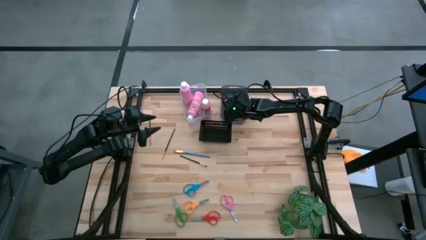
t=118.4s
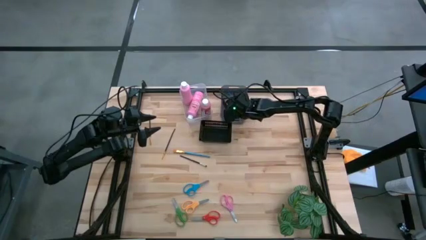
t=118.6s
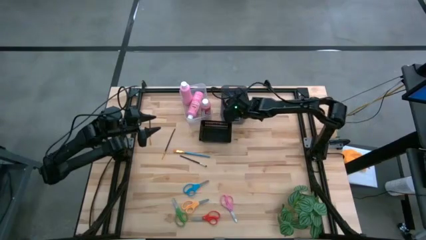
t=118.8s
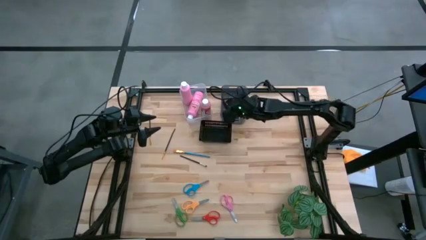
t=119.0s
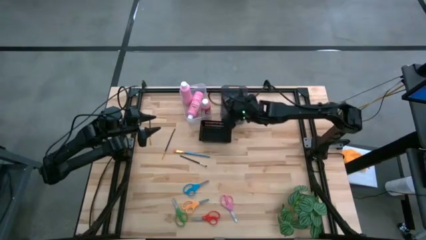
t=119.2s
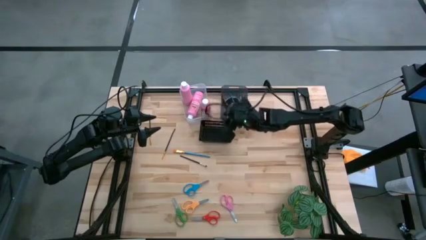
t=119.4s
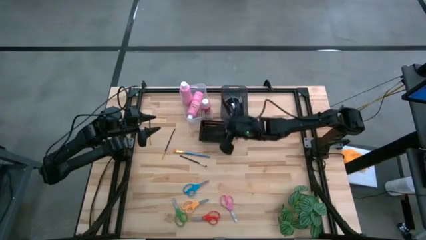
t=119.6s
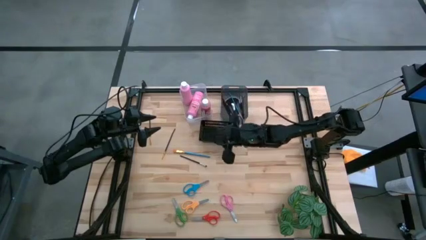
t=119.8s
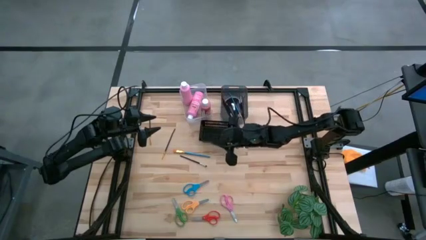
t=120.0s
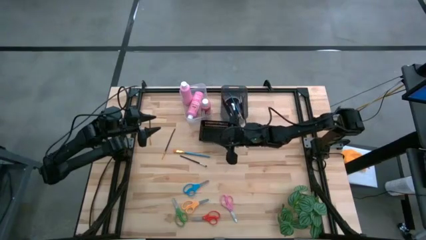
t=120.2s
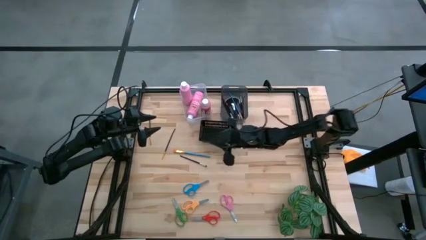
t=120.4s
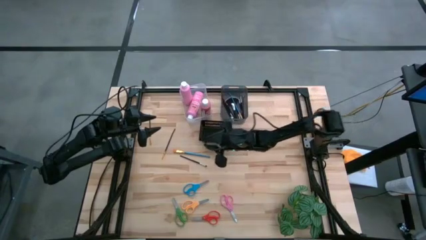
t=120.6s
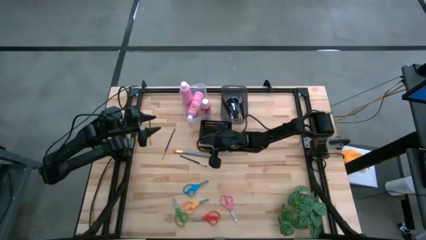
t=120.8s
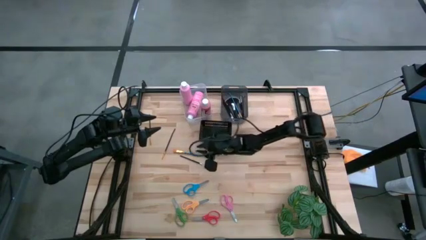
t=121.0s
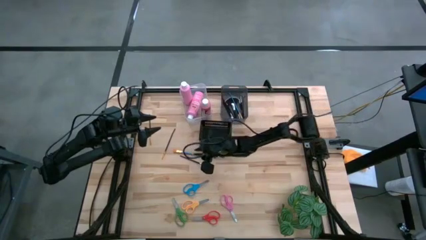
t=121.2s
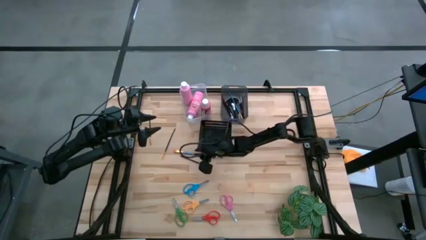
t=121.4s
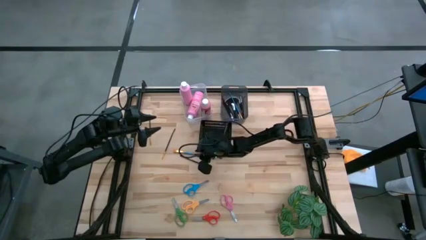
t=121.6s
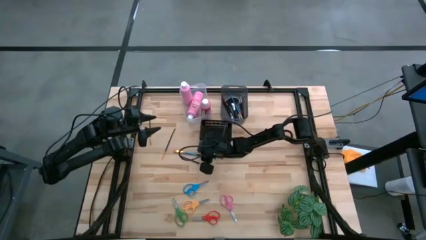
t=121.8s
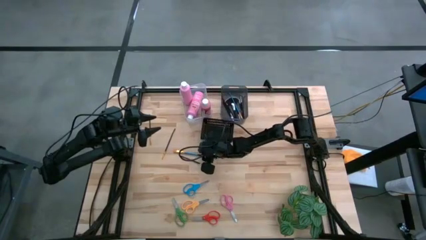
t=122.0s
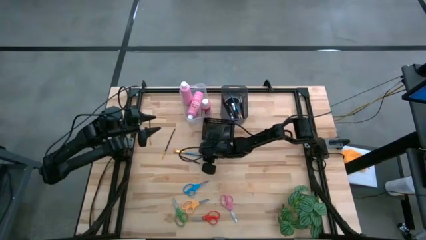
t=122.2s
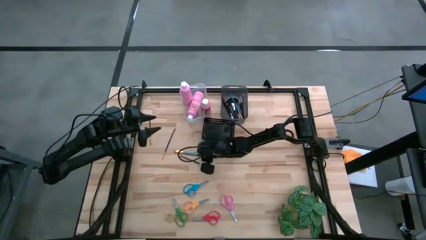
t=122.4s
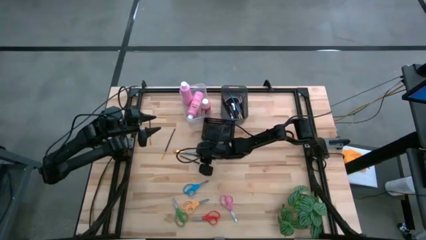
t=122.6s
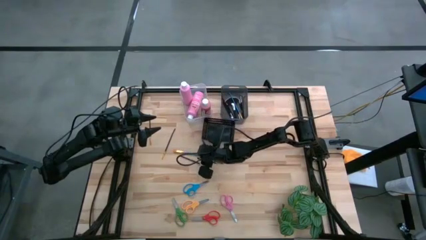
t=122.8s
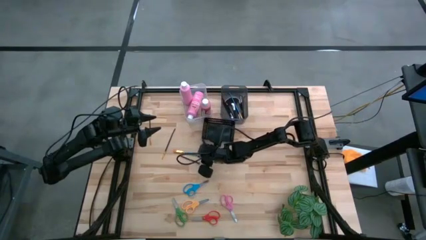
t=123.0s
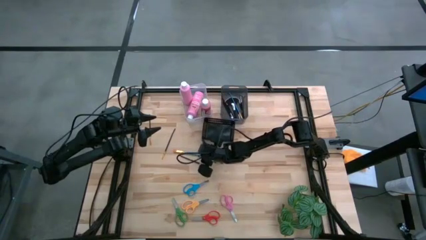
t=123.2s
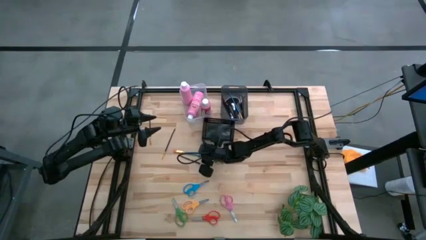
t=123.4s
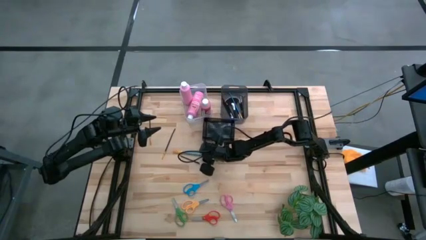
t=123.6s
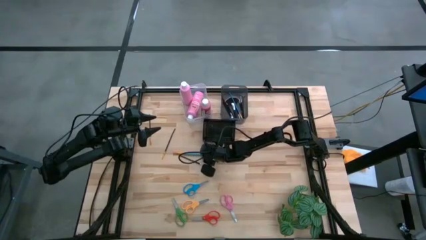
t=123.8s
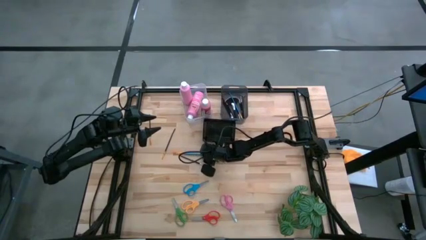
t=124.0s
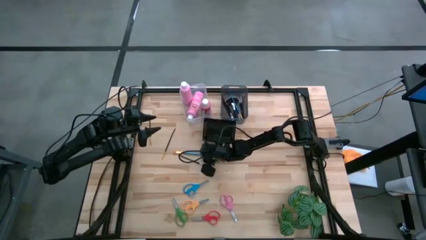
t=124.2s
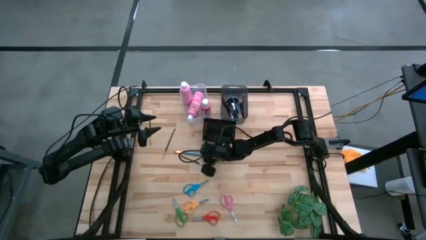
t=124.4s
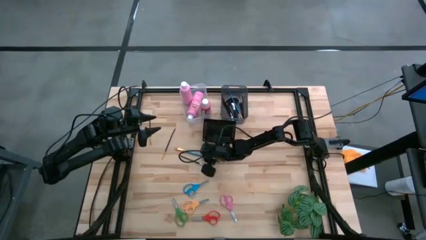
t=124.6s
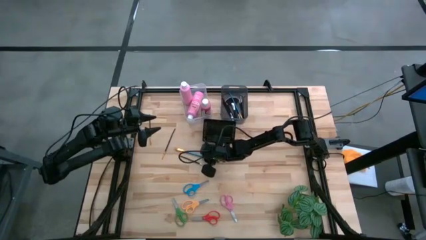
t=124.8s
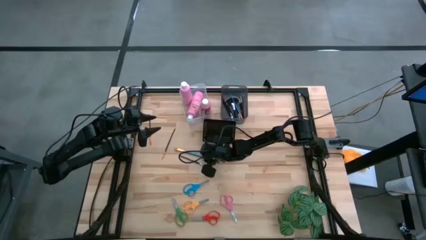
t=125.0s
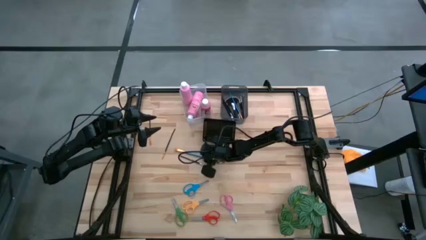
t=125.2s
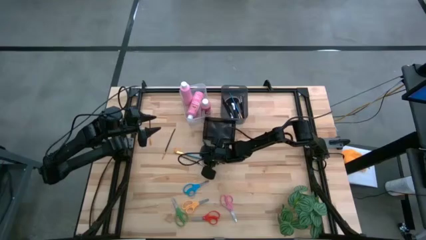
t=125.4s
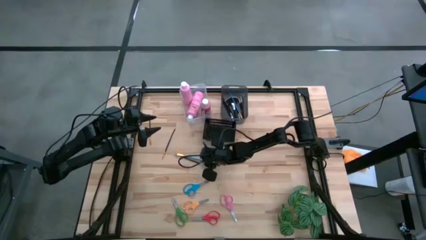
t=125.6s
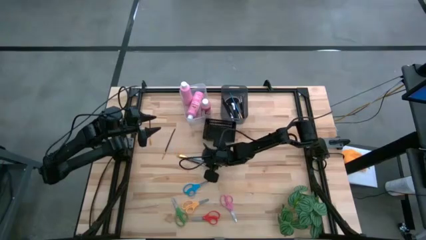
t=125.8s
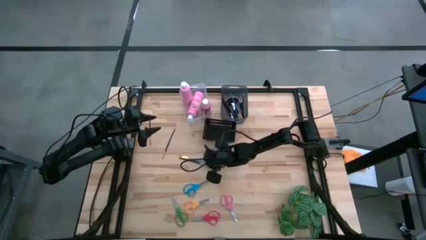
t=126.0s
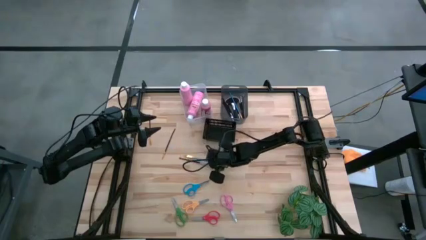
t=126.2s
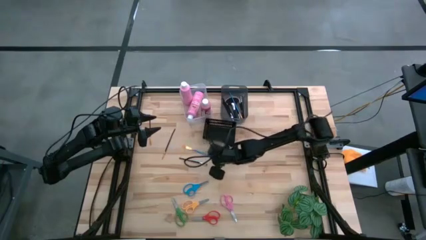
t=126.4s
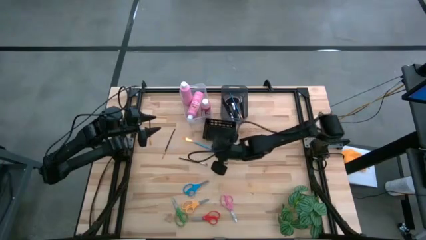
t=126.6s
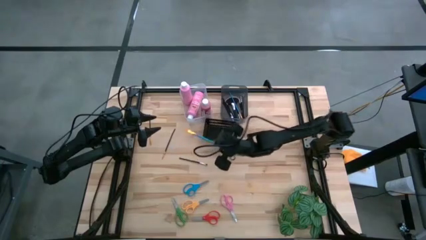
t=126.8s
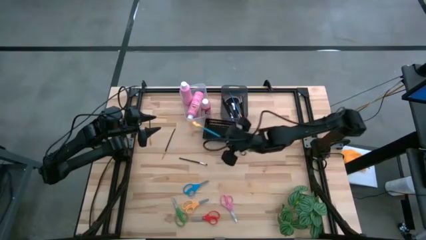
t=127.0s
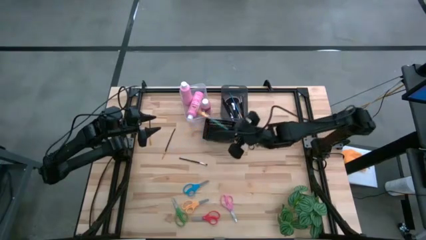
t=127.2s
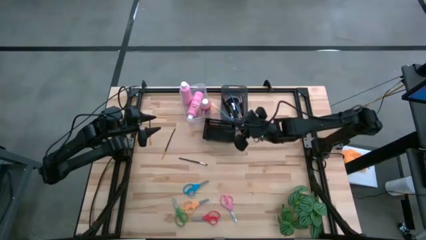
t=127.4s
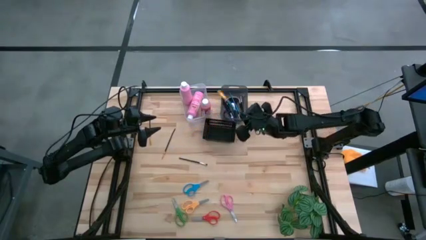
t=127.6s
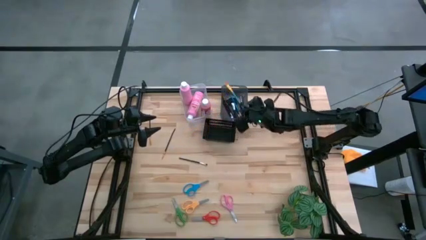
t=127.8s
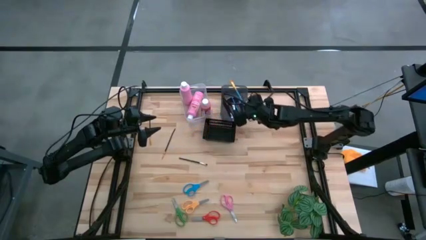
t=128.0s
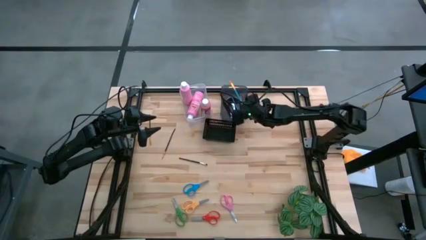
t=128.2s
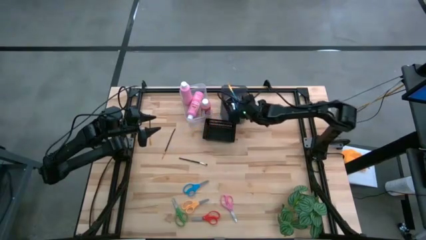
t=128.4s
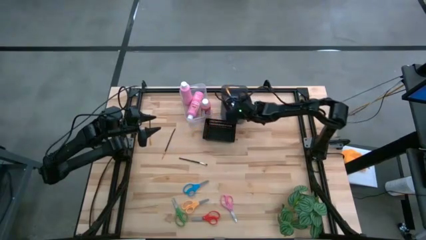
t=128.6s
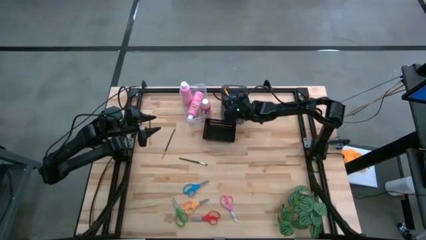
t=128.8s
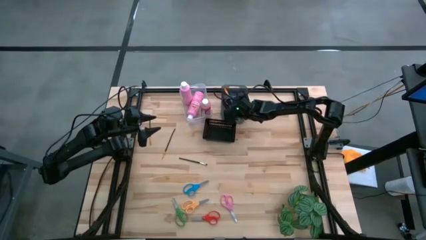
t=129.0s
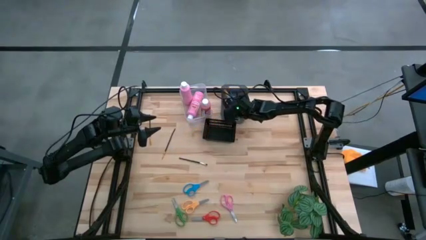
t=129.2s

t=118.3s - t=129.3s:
Task: Pick & Place Paint Supplies
Put the blue paint brush into the gray bin

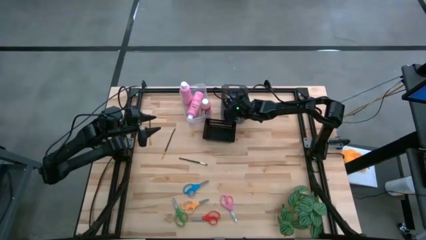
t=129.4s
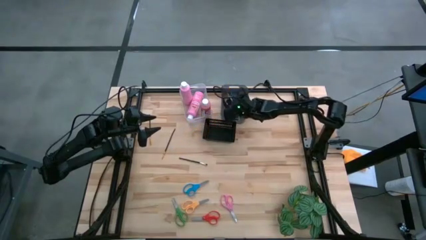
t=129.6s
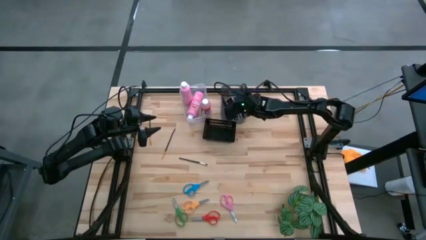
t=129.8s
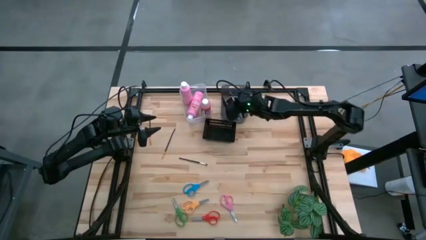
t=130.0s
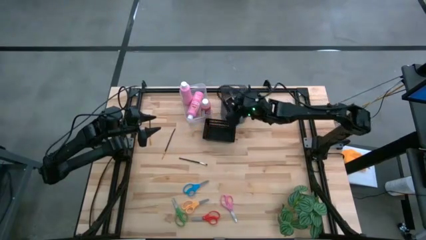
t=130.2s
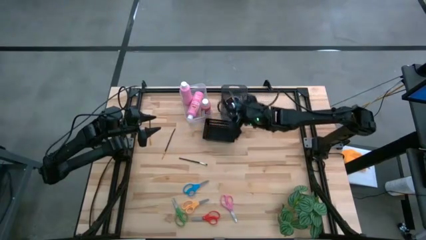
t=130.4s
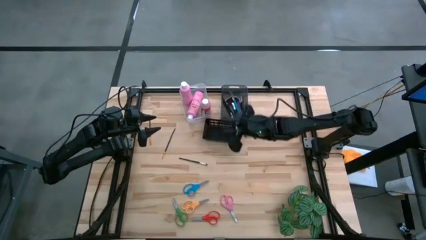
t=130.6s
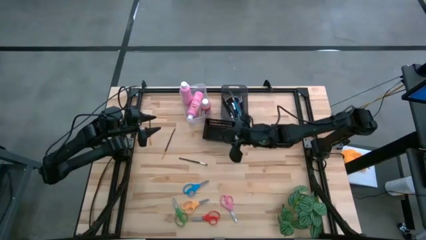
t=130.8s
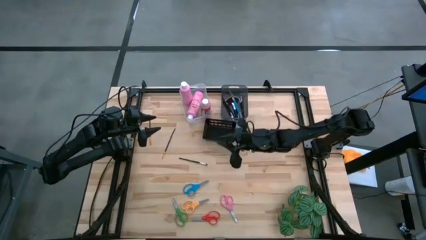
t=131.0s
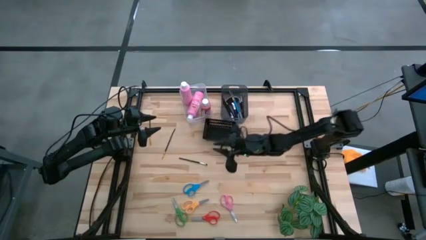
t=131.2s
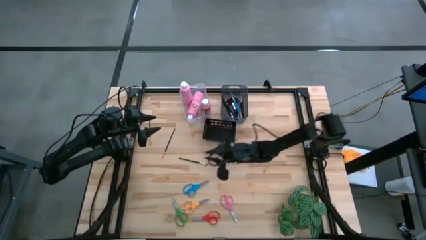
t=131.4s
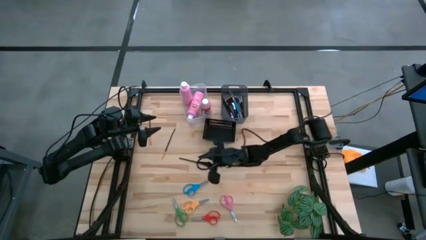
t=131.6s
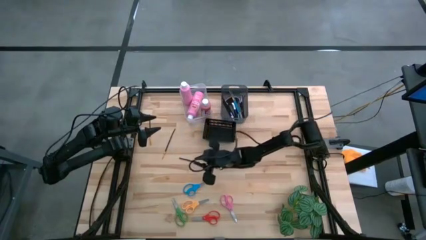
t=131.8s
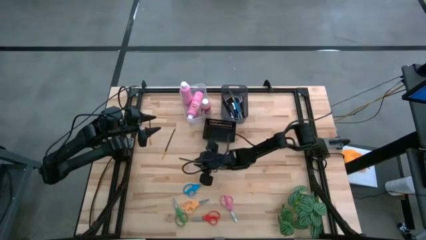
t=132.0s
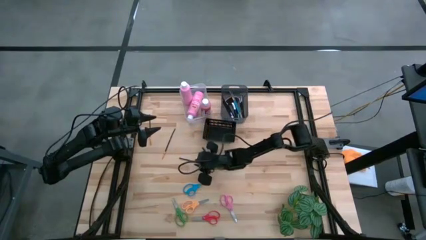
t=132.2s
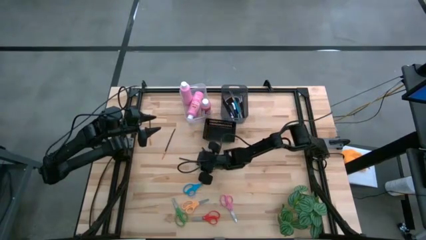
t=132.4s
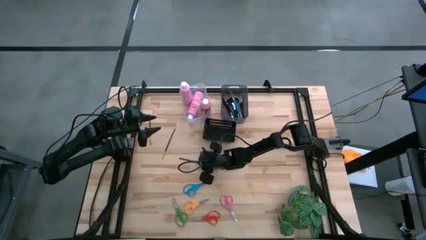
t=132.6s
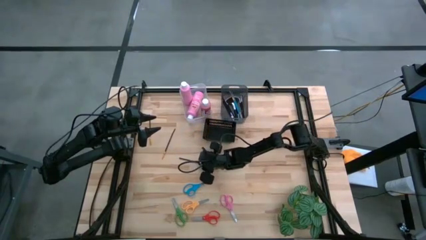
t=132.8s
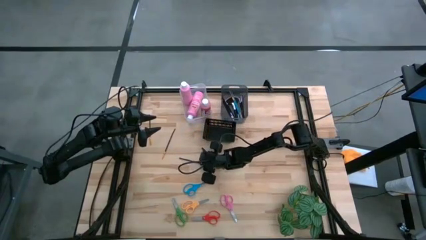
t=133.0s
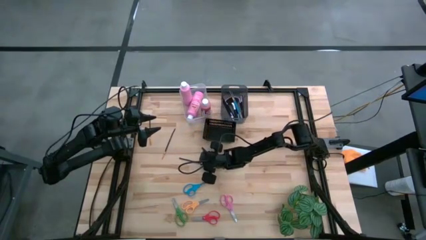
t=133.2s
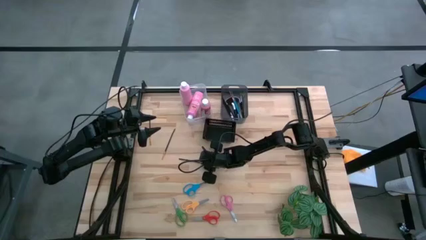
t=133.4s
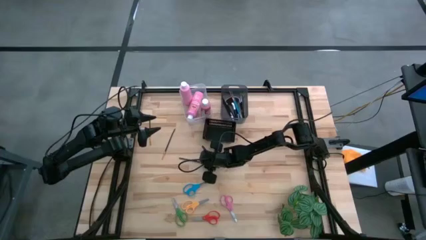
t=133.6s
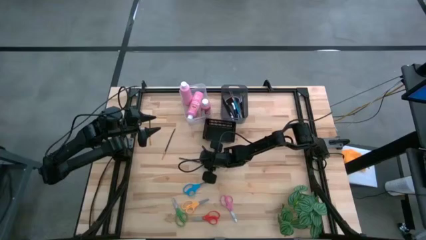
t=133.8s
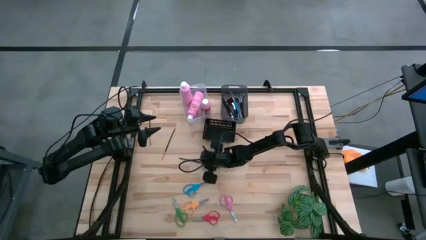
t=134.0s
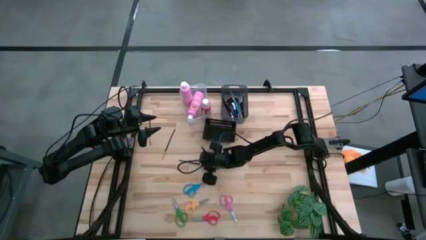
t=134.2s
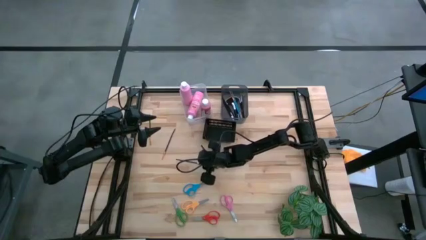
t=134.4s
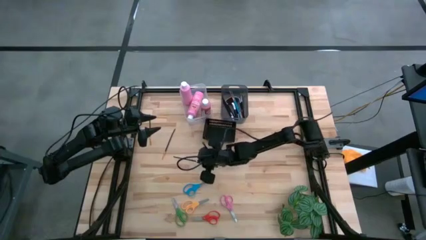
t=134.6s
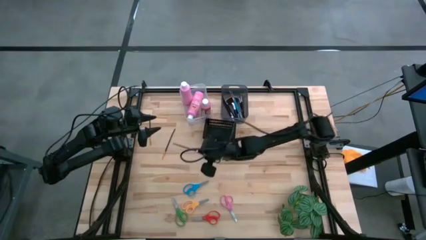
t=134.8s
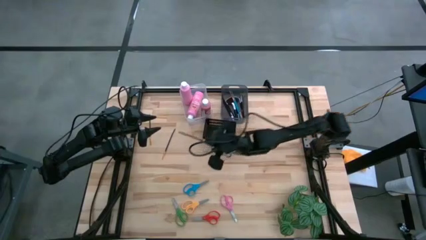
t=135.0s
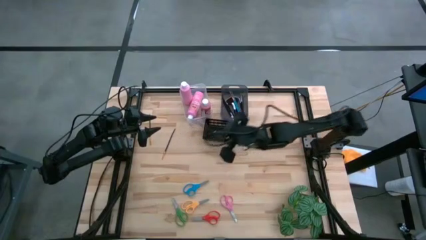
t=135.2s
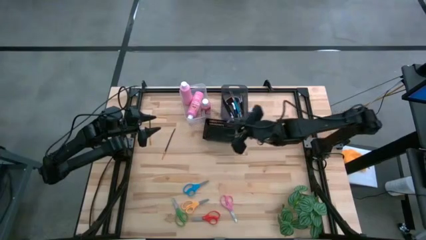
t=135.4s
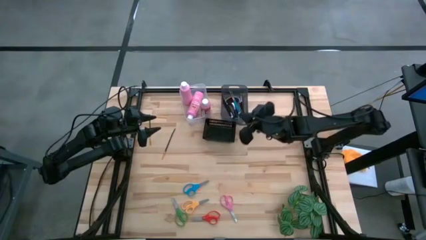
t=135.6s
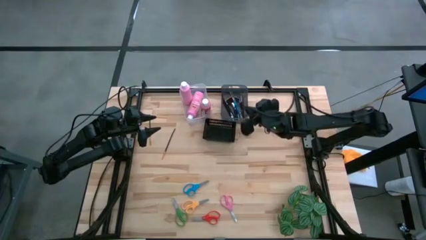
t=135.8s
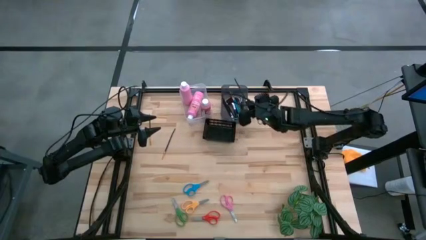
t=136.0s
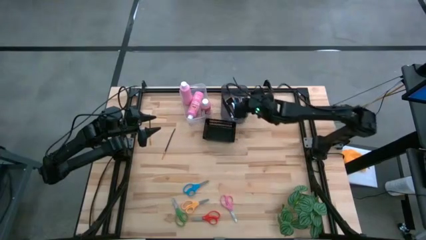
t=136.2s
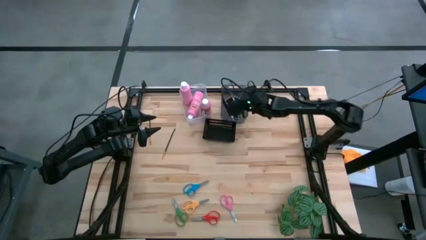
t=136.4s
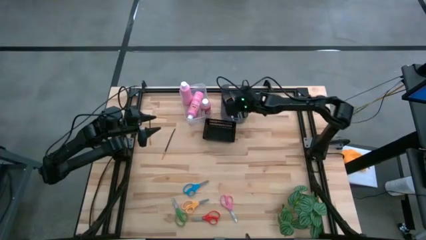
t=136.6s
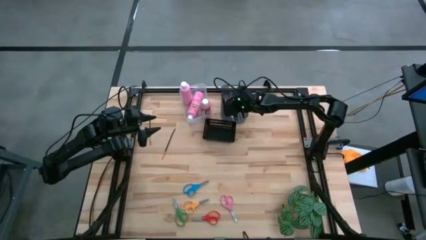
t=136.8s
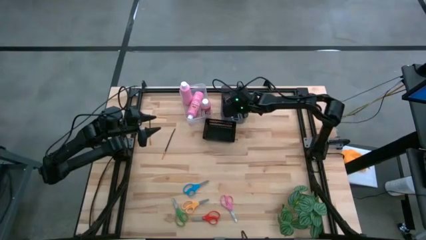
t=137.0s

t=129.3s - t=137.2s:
Put the black paint brush into the gray bin
